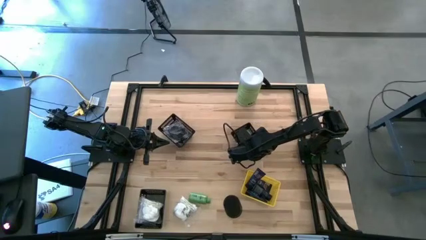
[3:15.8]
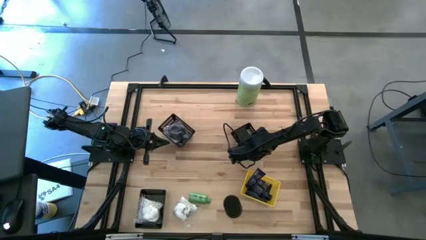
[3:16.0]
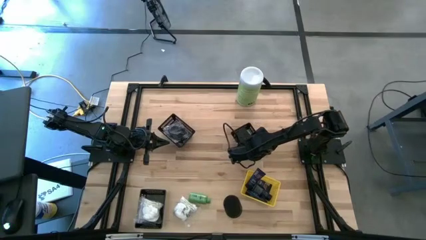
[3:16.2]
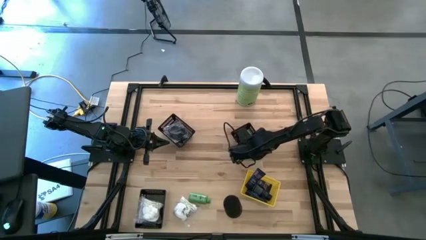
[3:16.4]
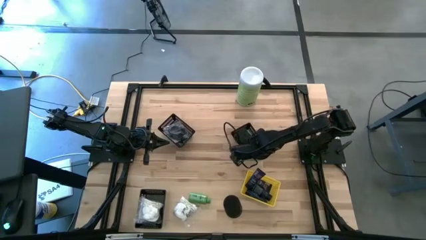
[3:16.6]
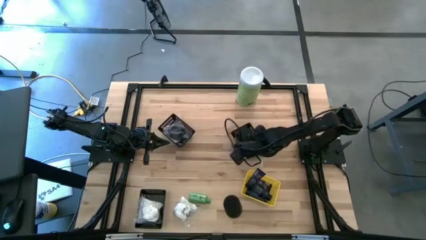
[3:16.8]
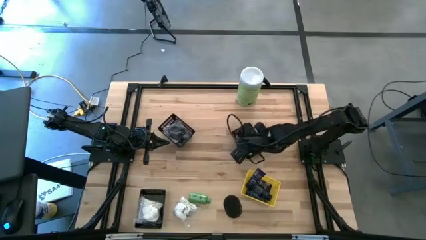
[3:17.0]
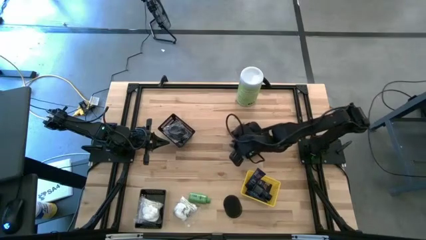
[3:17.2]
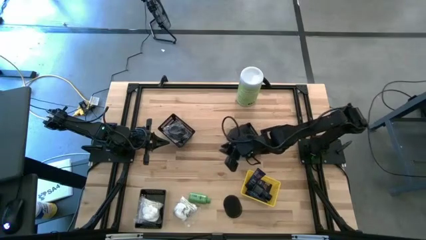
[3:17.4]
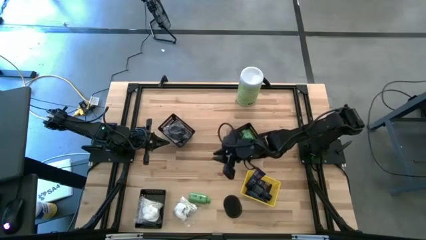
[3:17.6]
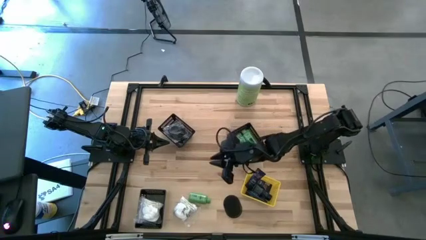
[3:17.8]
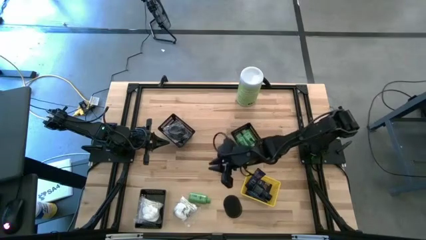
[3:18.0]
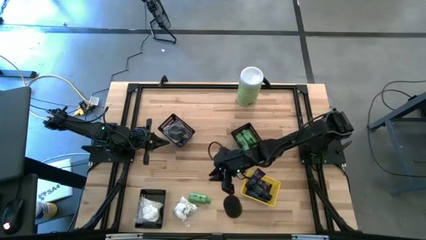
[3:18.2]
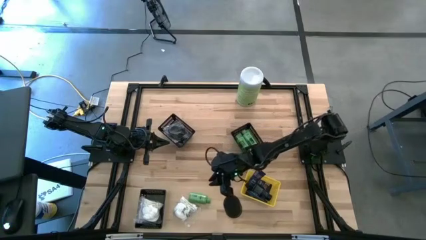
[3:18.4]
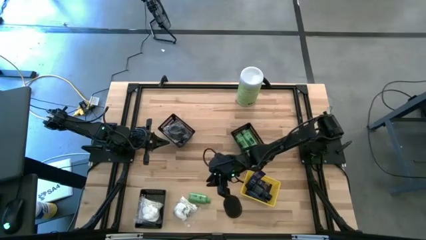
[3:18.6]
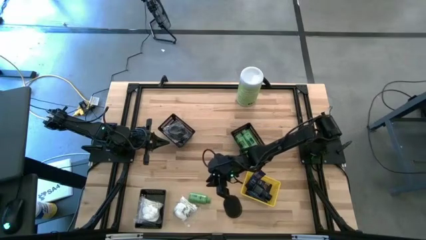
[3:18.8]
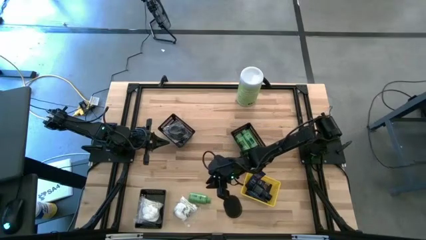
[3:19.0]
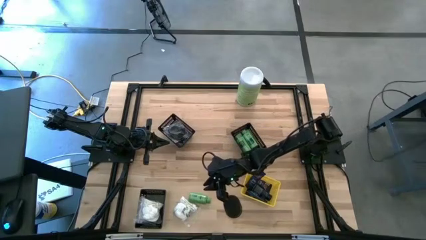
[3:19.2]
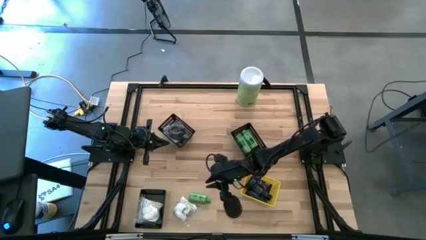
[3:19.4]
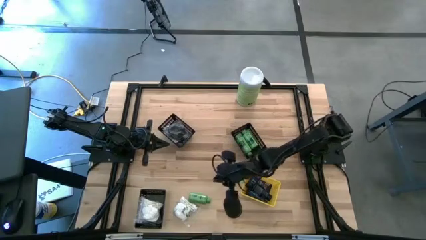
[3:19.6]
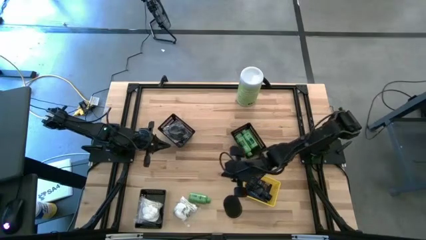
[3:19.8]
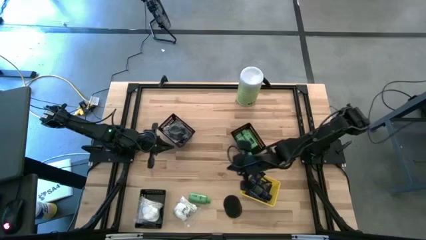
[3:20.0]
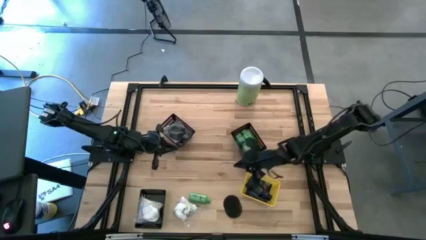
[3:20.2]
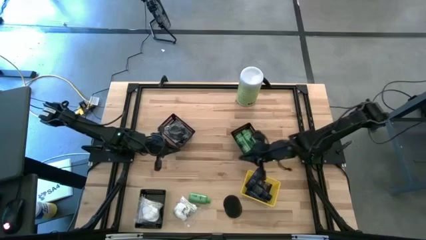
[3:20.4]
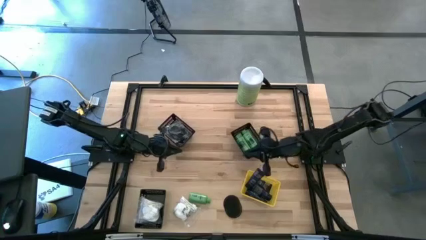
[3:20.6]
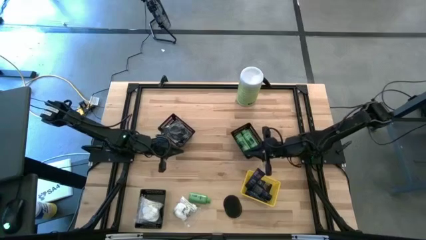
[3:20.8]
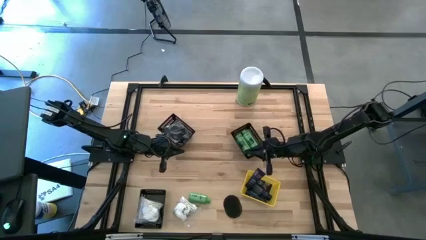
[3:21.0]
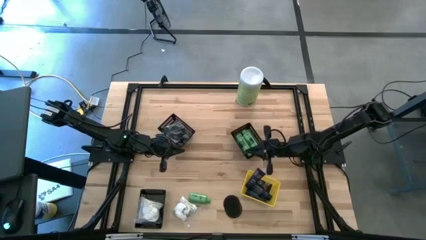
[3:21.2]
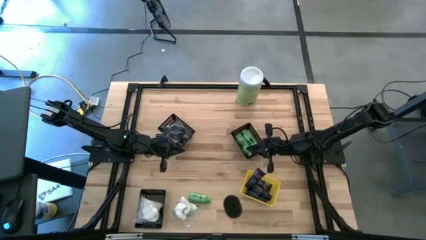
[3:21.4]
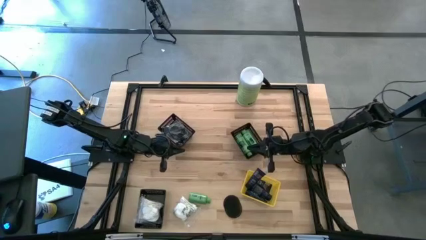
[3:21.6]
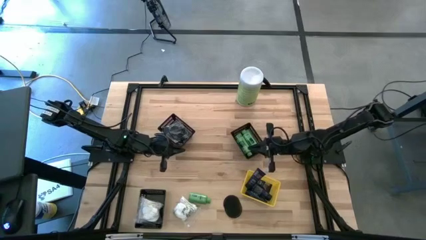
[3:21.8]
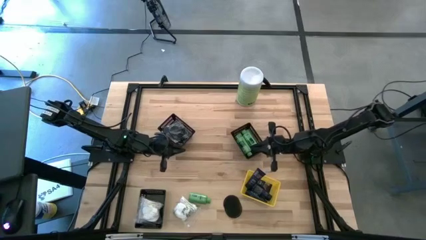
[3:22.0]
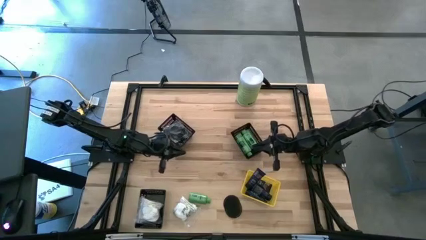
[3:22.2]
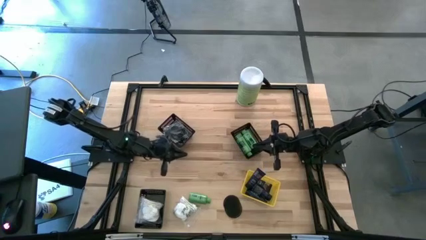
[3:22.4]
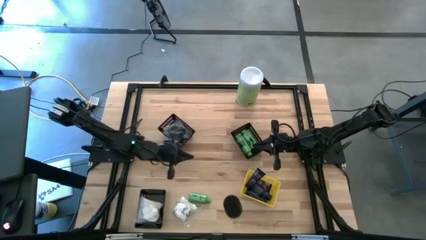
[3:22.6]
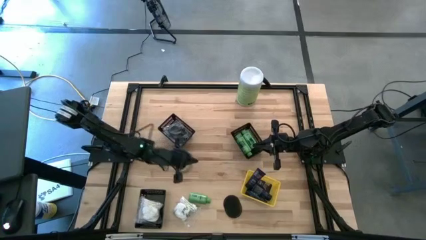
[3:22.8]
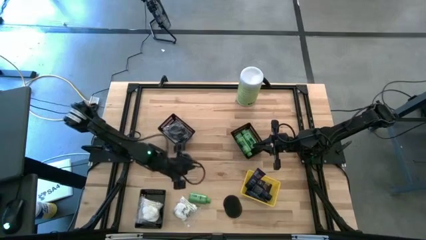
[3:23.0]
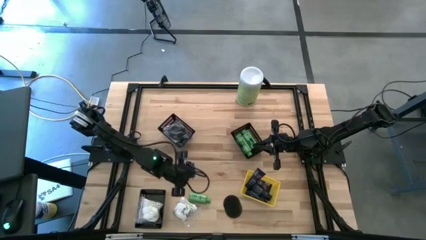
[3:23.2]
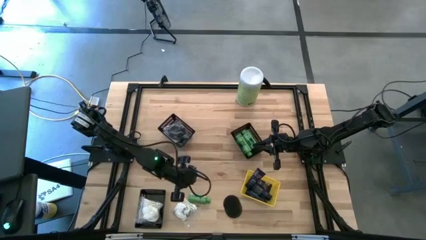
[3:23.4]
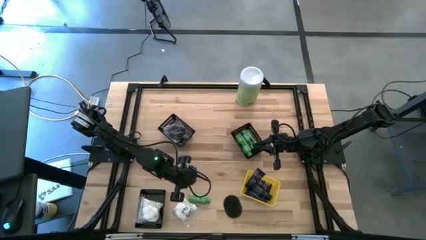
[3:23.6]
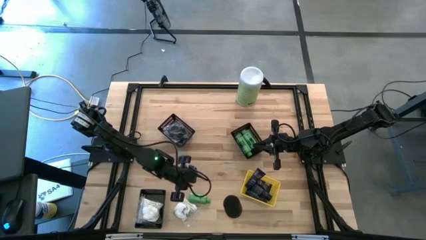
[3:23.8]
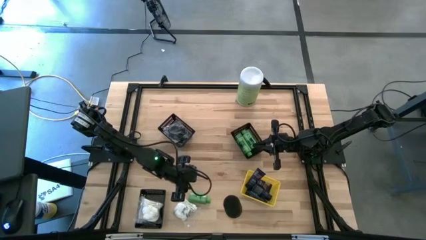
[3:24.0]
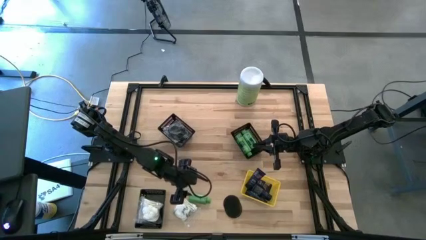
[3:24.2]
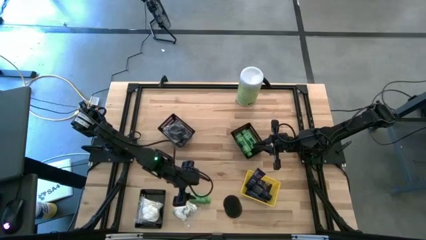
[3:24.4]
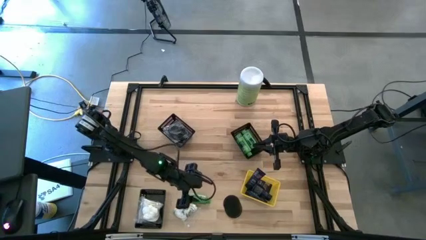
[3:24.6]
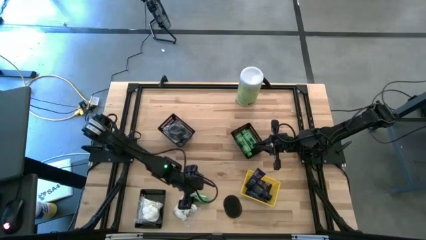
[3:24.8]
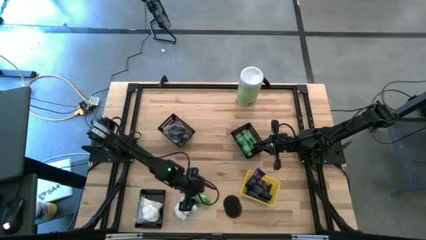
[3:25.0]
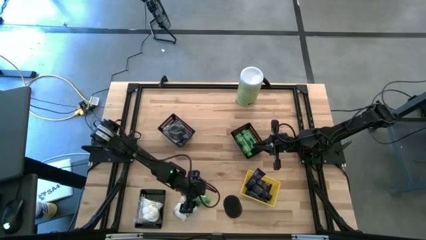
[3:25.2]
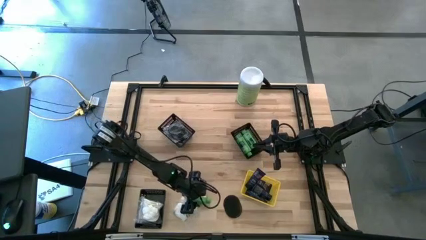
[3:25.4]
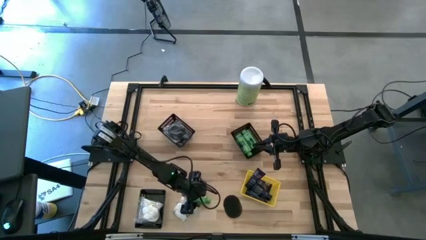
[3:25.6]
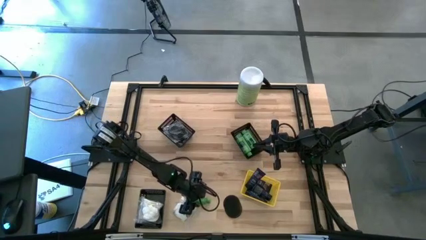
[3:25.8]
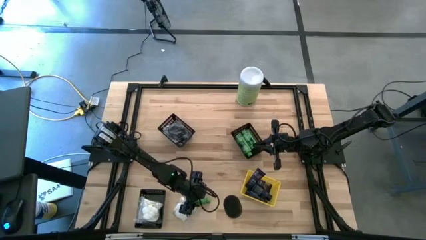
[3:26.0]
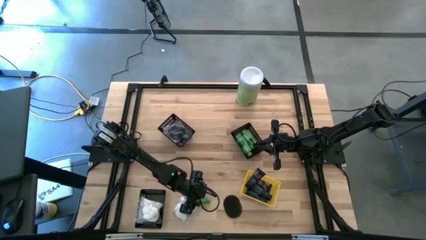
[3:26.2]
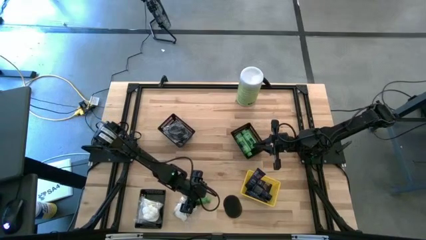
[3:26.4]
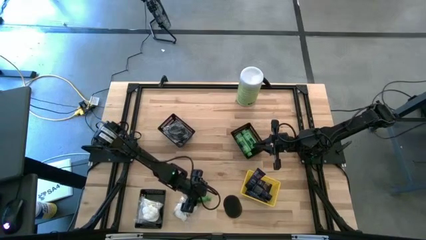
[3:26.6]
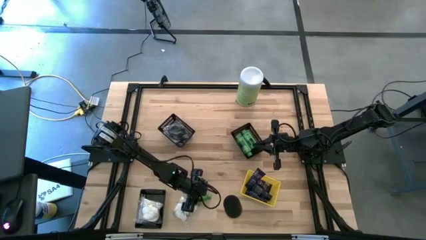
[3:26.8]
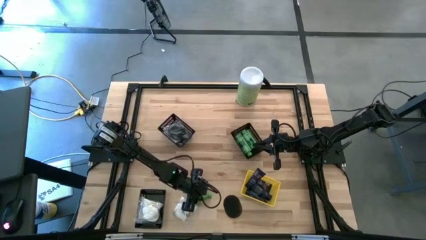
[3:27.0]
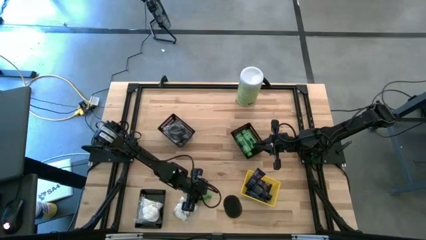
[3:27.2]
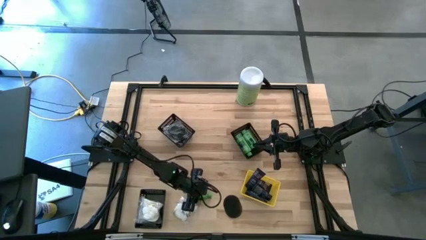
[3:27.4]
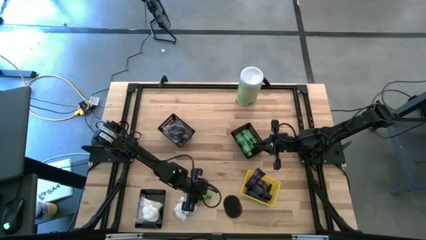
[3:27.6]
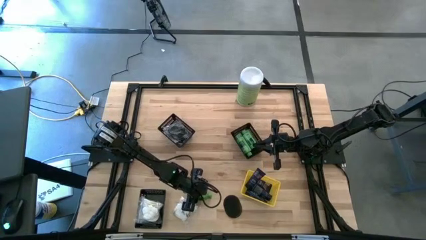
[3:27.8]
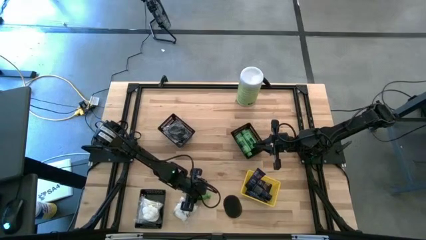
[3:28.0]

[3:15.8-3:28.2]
Task: Pick & Place Travel size toiletries
Put the shampoo bottle into the top right black bin

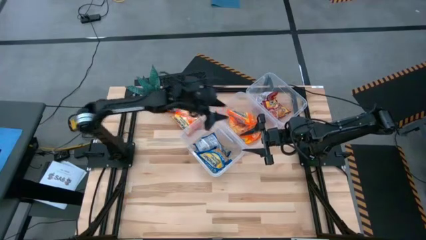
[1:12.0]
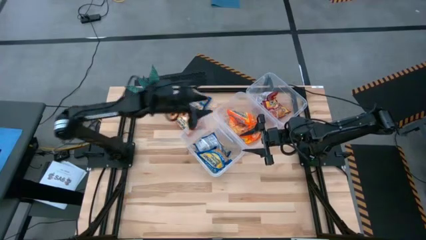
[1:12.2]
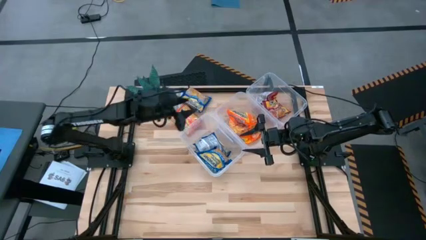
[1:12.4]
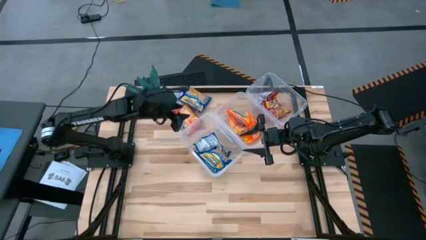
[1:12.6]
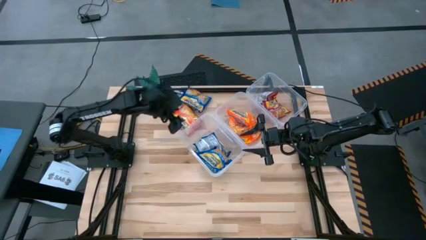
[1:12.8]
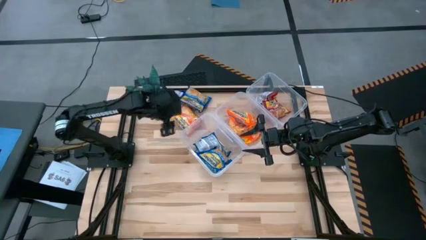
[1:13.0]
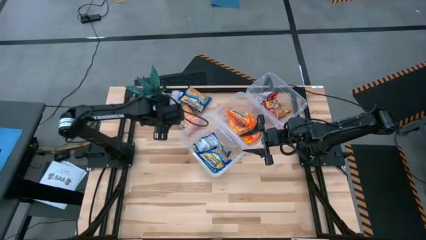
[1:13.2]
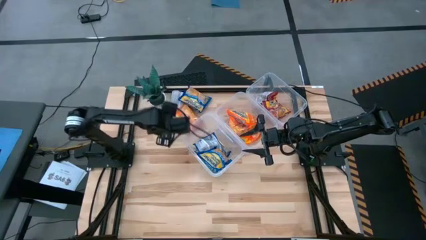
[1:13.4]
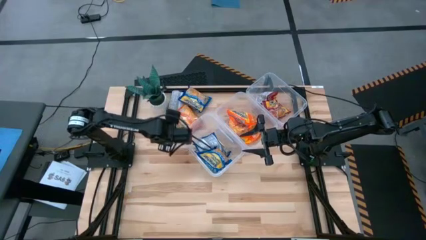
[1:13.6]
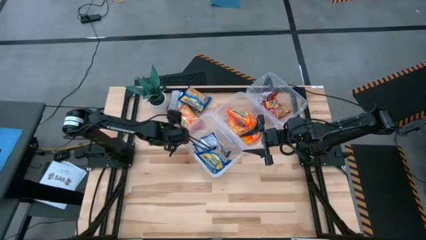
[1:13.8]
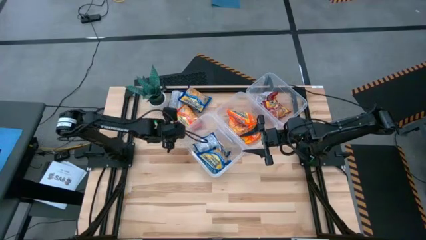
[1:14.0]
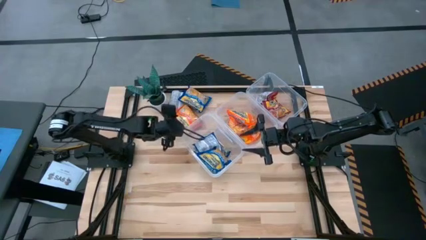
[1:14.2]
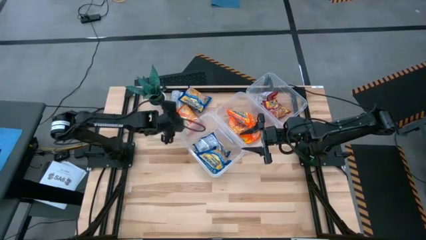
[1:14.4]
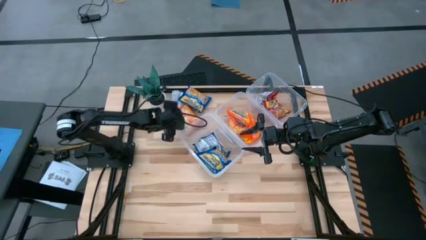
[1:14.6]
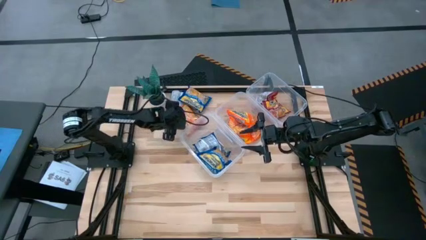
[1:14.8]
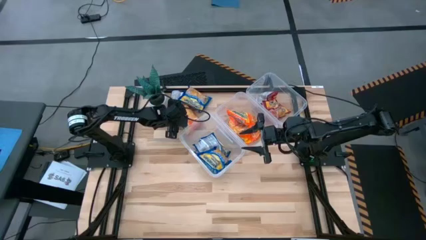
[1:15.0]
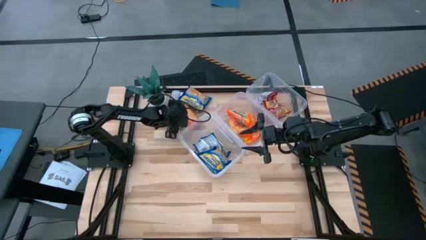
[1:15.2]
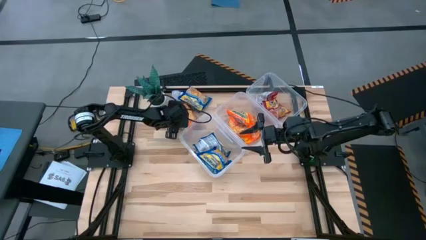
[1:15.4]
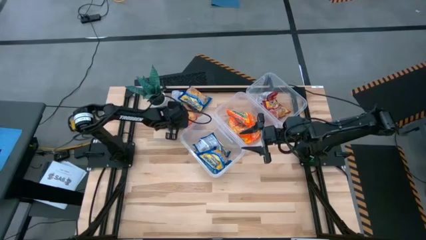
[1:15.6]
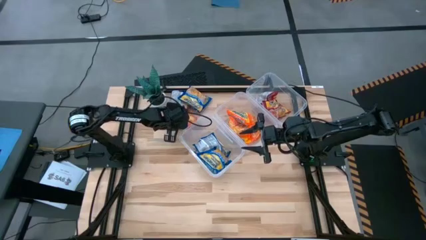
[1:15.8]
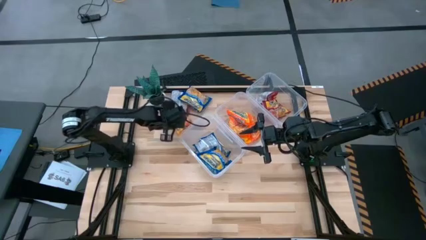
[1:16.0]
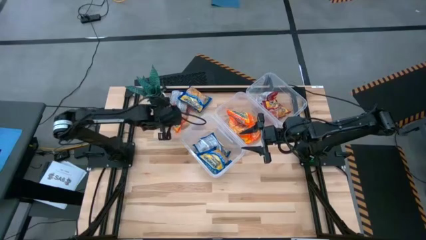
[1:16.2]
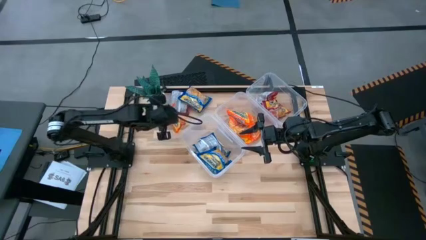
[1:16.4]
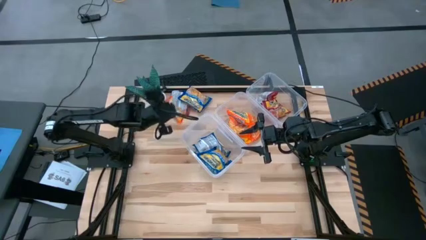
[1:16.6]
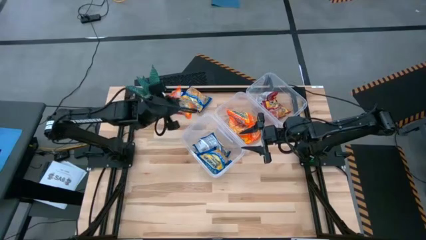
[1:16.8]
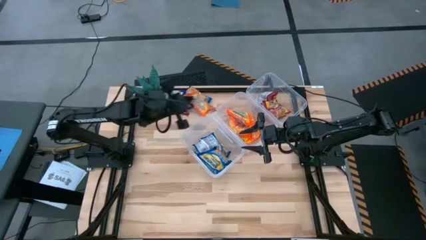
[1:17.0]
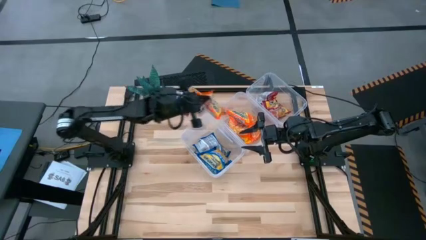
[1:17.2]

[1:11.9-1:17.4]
Task: Sort Maruchan noodles
Put the orange noodle pack into the middle transparent bin
